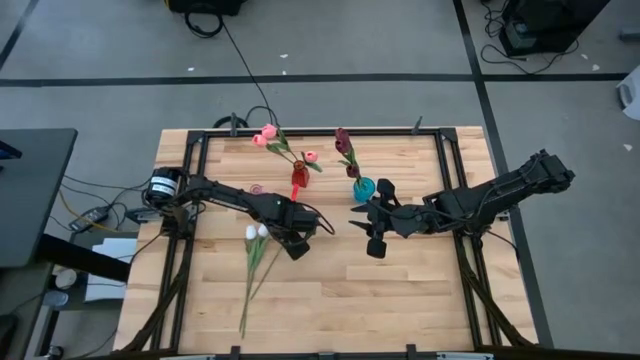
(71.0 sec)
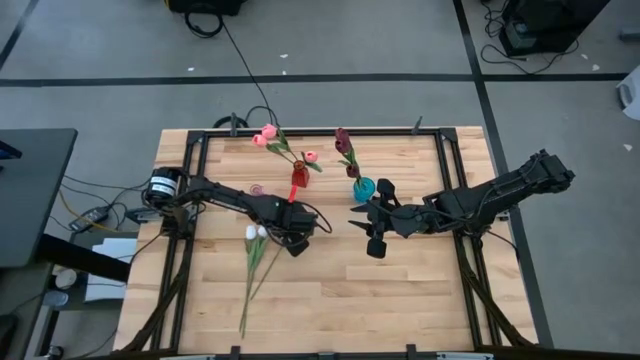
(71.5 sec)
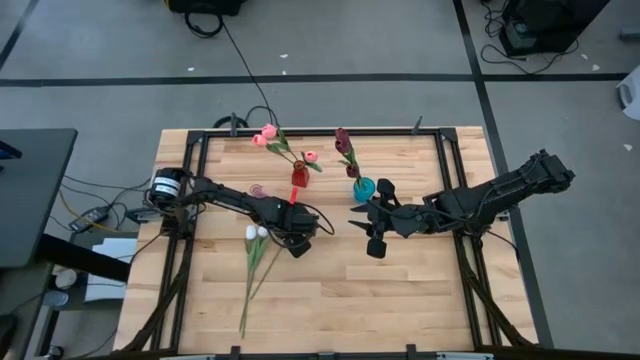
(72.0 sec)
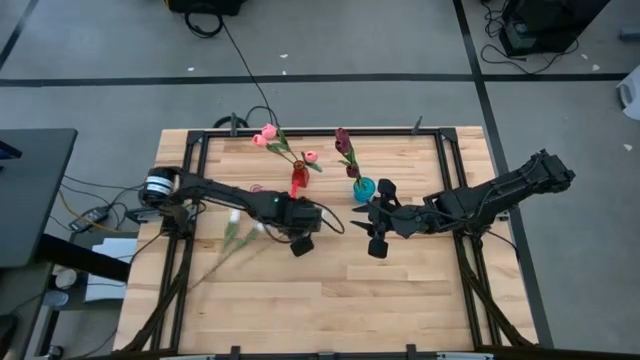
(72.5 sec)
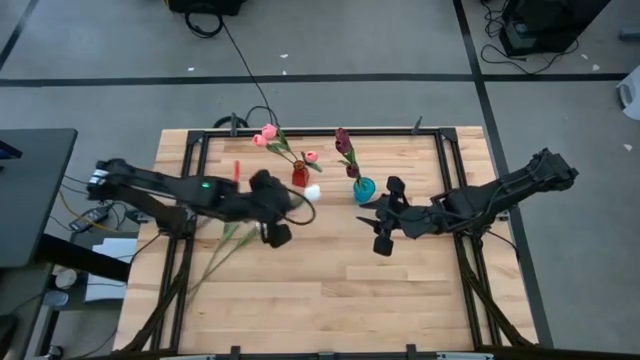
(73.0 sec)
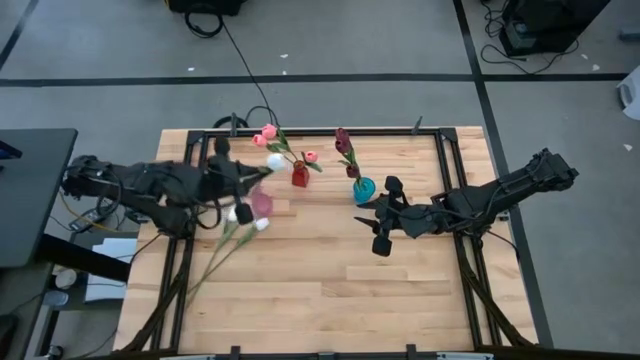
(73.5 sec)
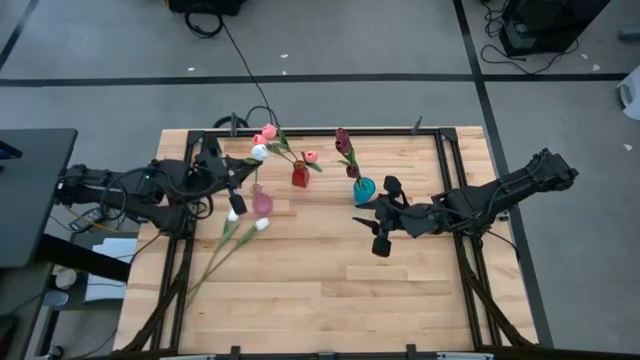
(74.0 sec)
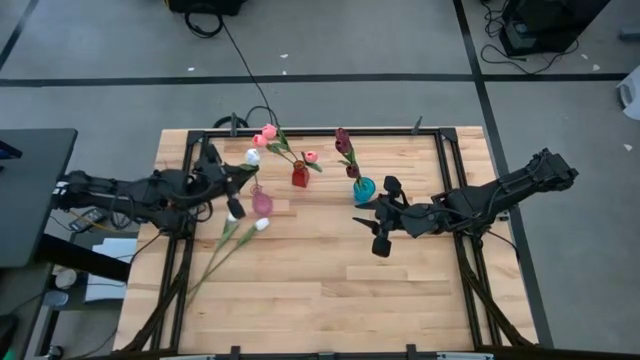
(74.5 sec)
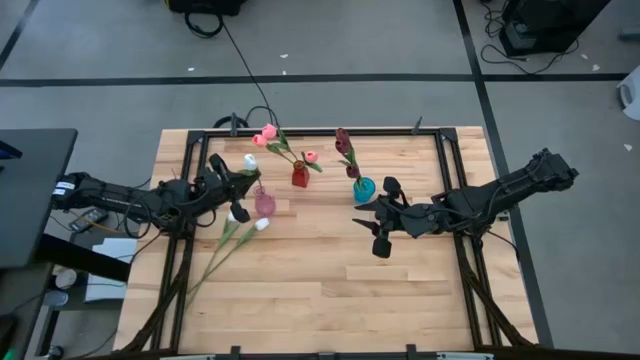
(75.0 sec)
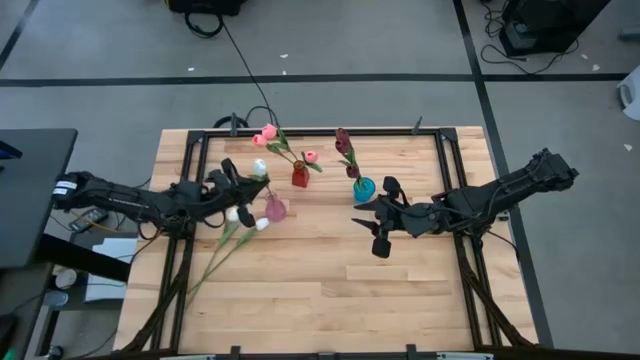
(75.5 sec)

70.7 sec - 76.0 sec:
Task: Sort flowers into vase by color
Put the white tulip into the purple vase

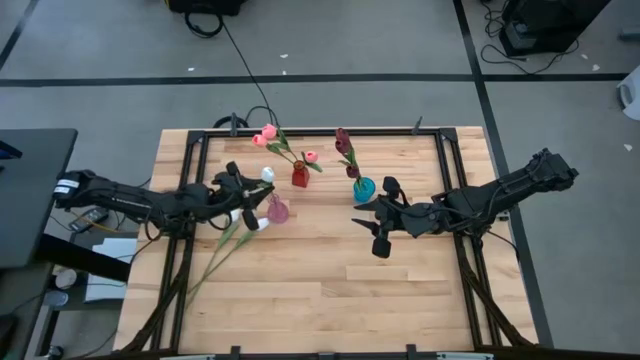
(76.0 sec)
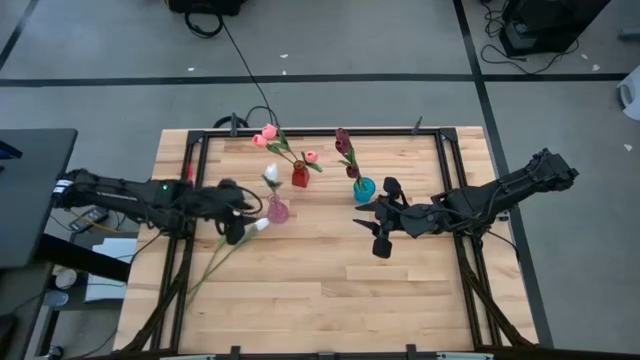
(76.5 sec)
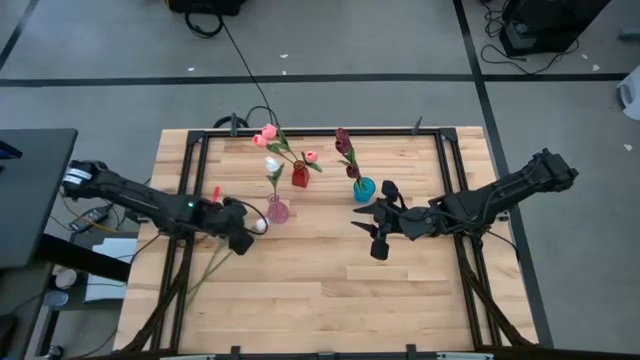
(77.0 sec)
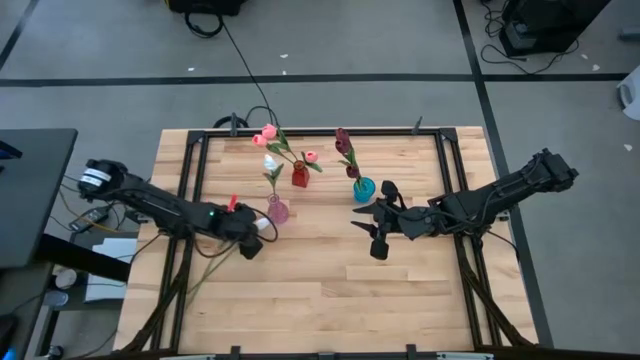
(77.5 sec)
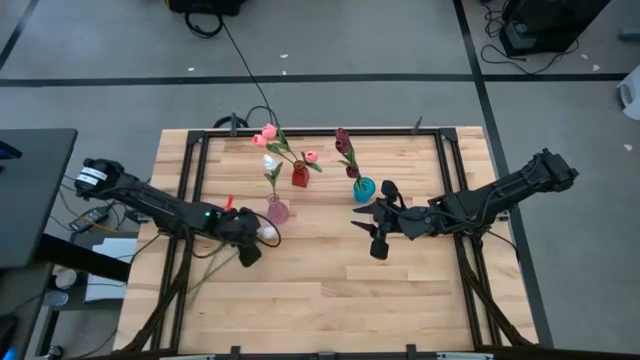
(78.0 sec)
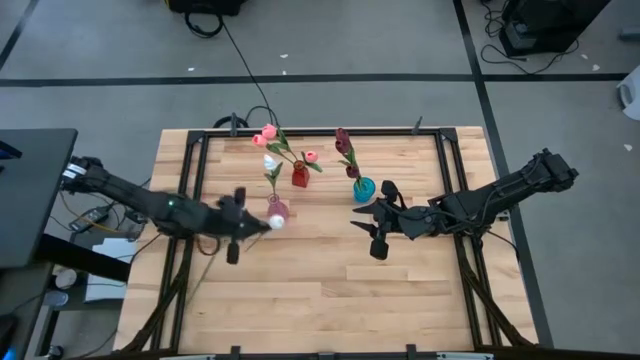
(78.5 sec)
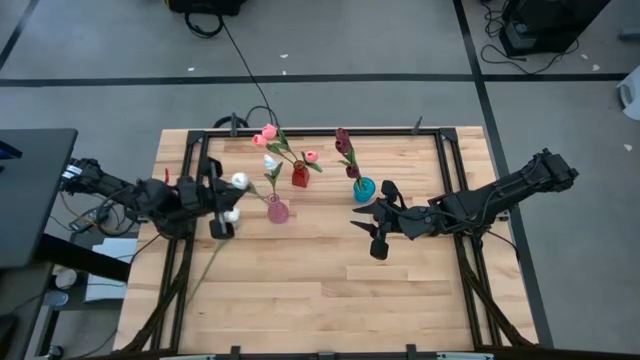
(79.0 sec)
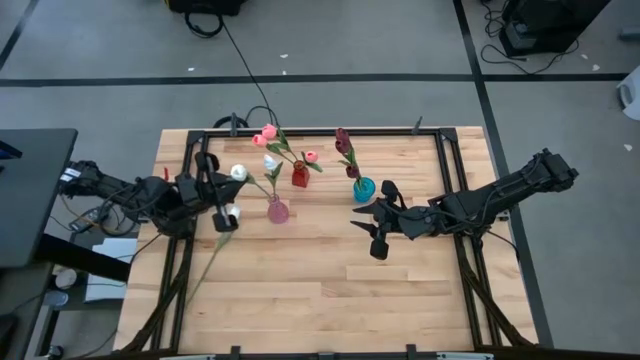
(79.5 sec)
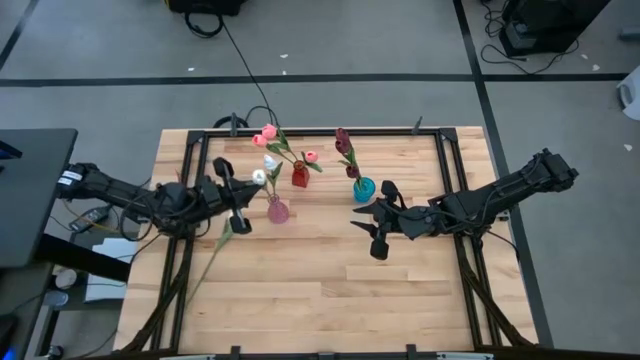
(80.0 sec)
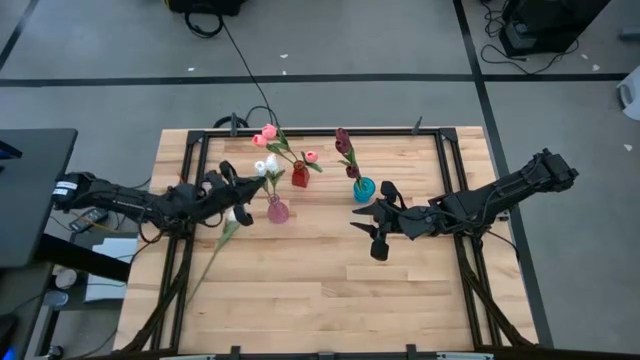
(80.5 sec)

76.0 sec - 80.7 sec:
Put the white tulip into the purple vase

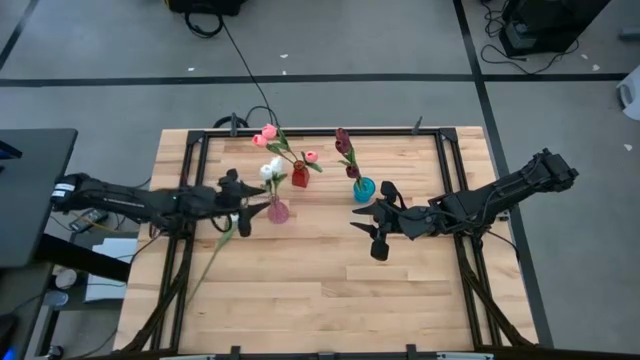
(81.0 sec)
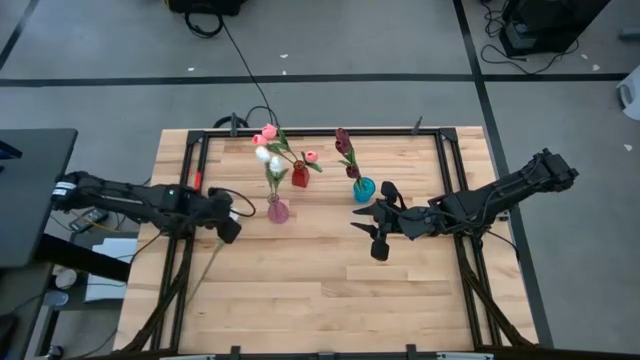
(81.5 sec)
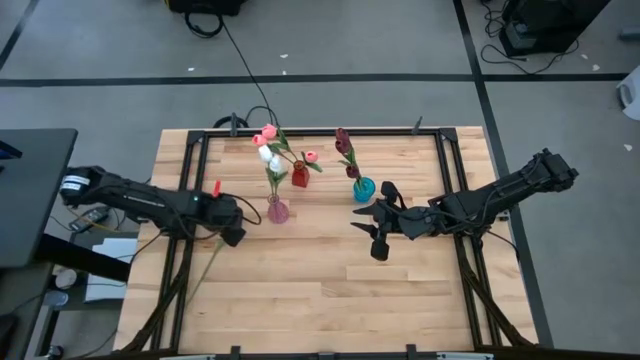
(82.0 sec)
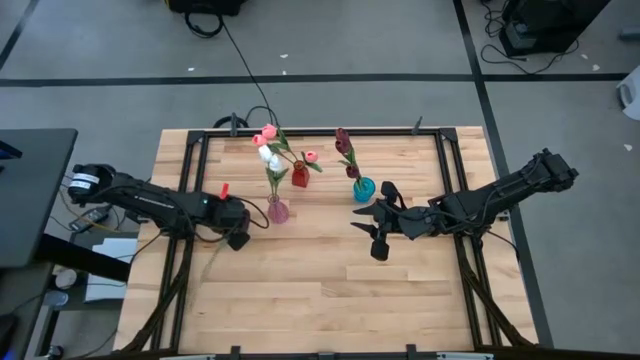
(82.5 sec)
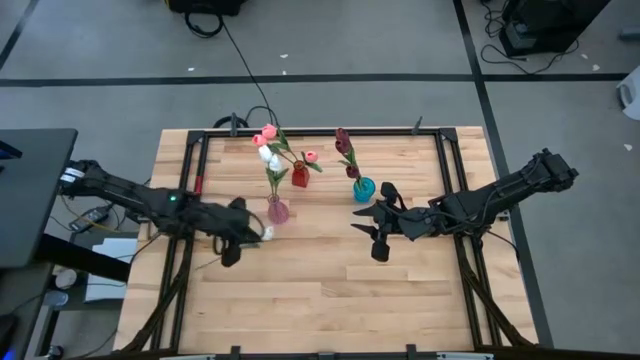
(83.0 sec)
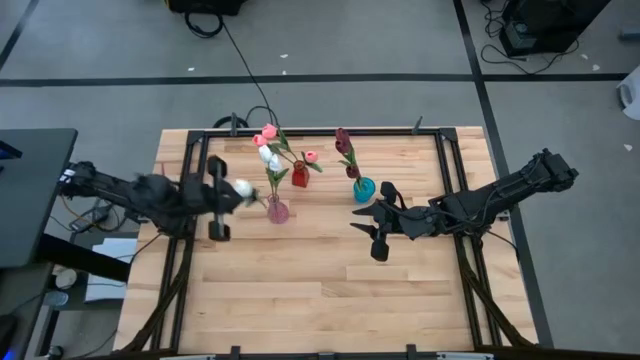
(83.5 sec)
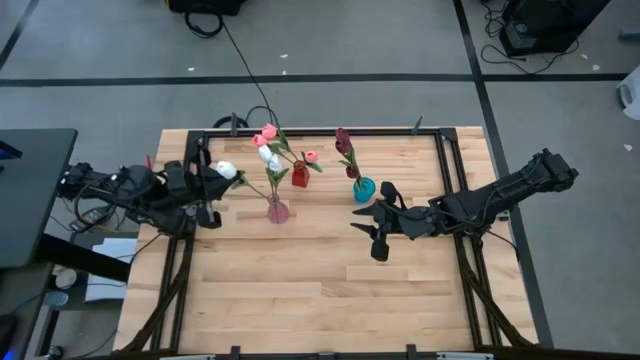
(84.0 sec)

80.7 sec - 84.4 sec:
Put the white tulip into the purple vase

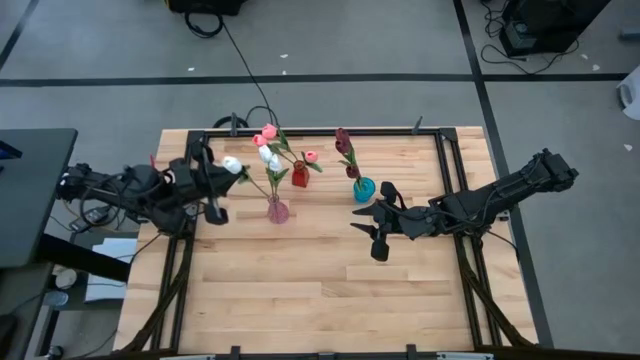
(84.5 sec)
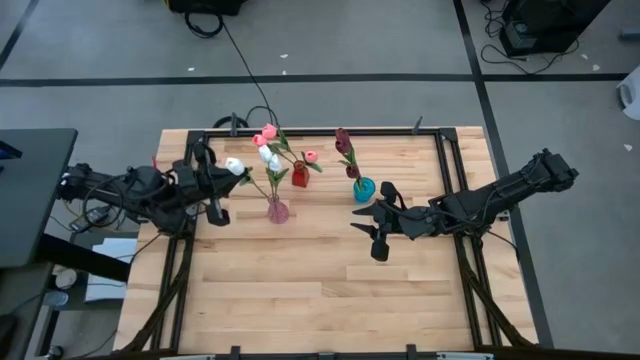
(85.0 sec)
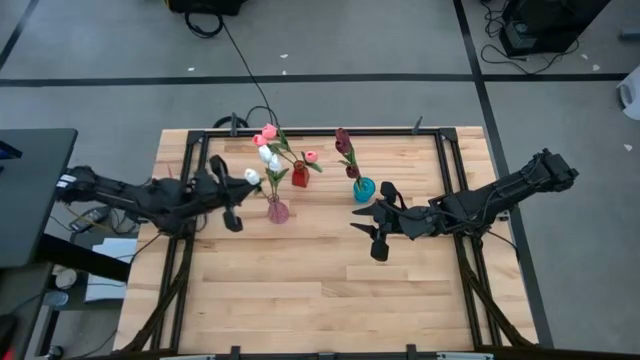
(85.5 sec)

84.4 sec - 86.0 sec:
Put the white tulip into the purple vase

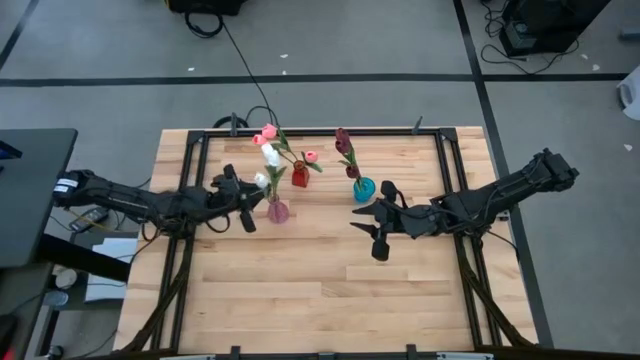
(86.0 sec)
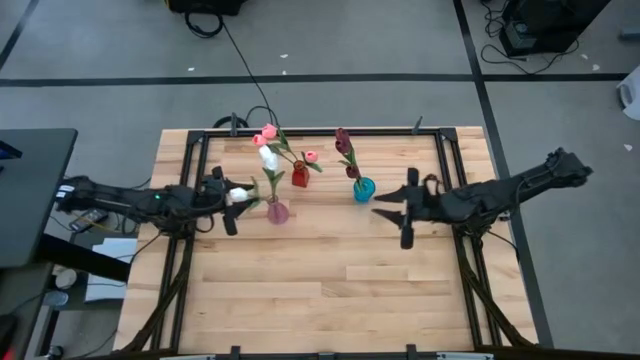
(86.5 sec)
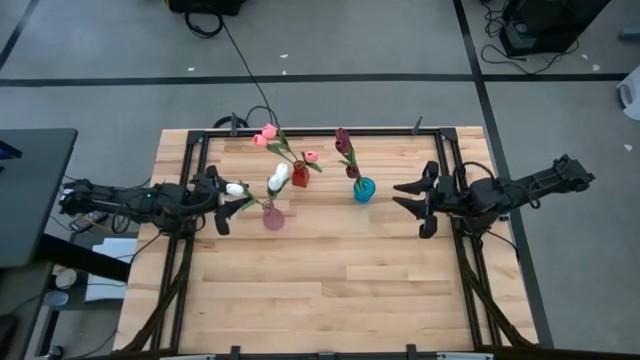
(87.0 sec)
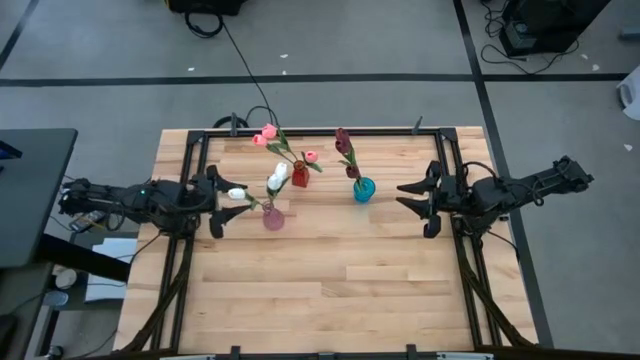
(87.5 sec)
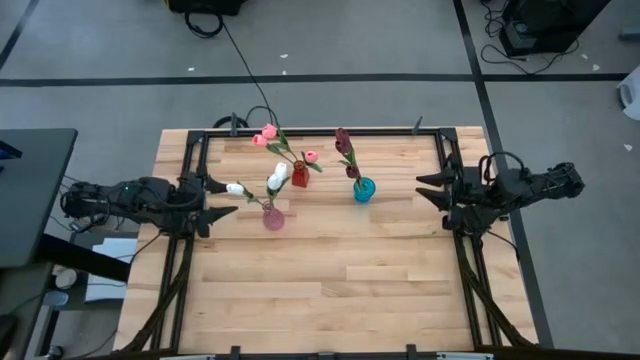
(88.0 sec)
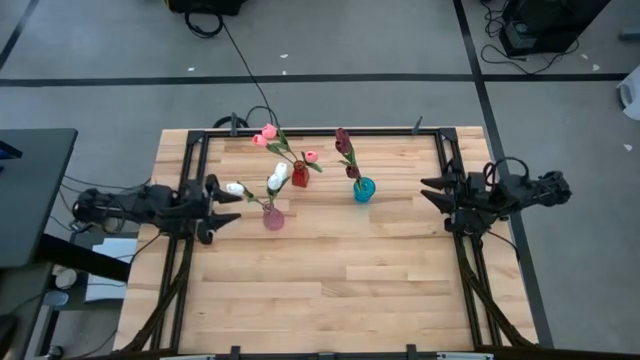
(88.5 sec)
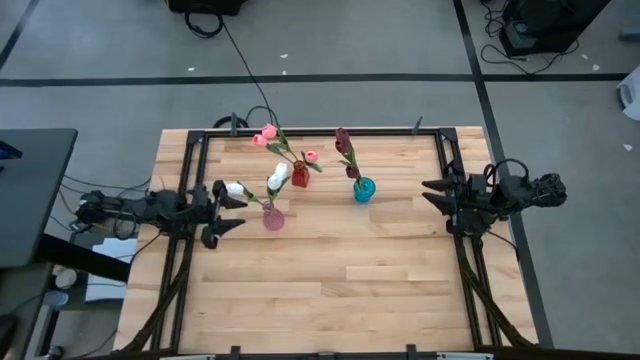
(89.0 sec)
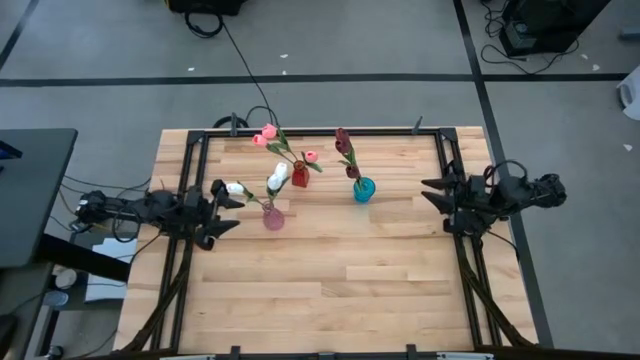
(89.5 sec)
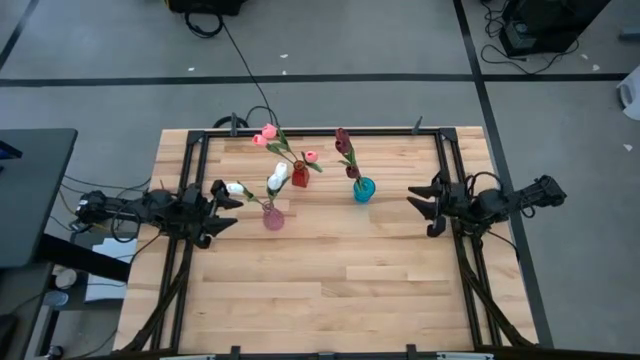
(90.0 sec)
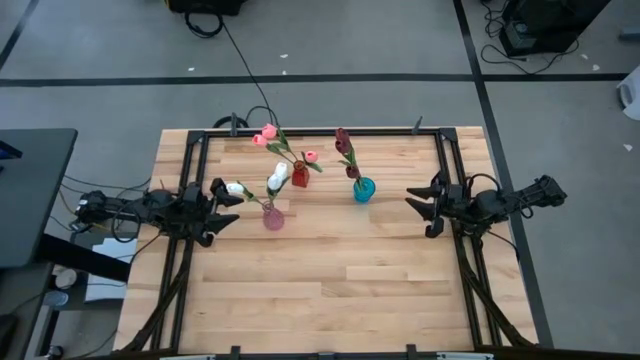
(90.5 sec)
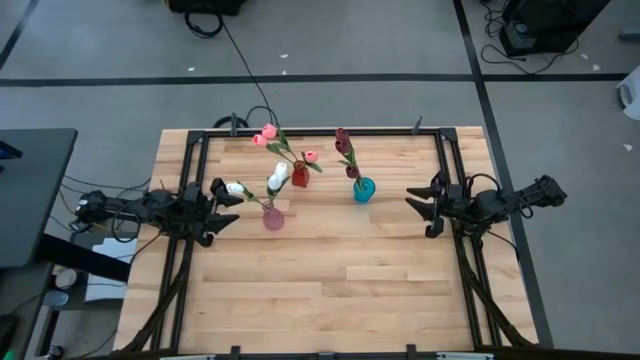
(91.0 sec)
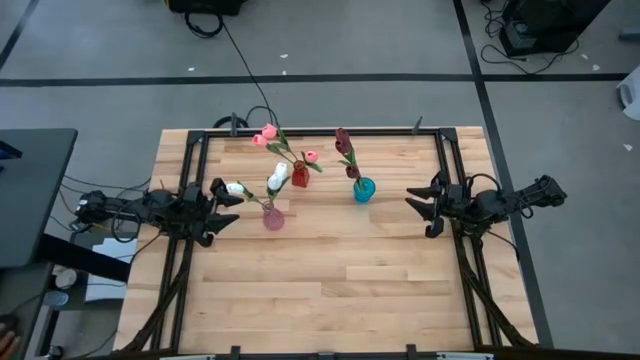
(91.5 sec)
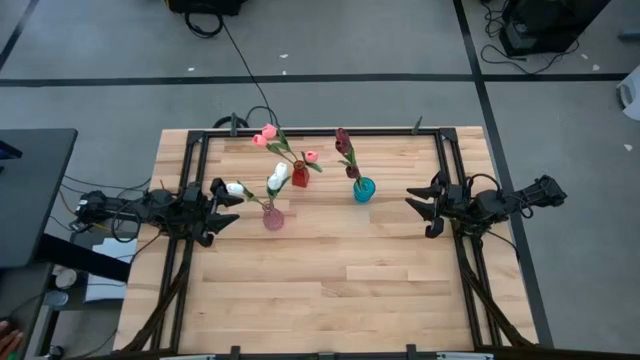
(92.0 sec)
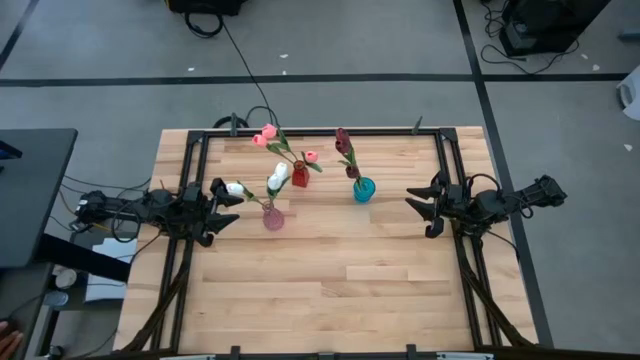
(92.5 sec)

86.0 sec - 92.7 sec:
Return to Home Position
